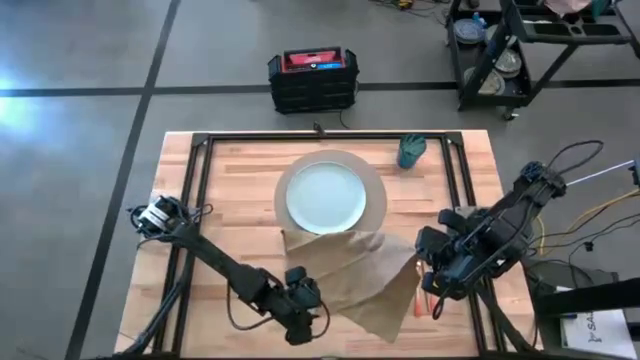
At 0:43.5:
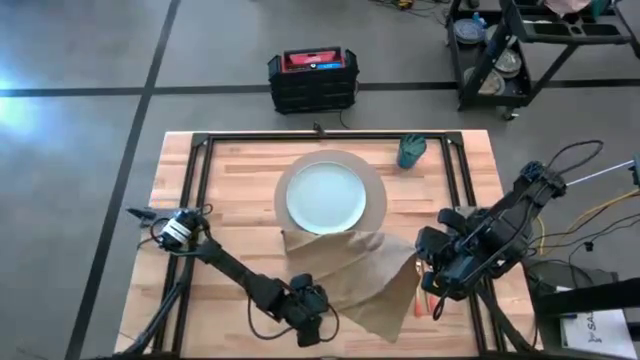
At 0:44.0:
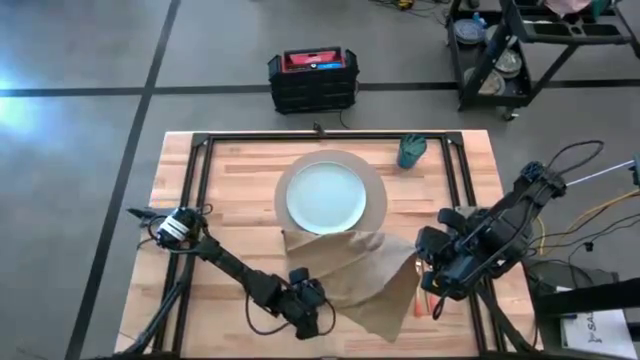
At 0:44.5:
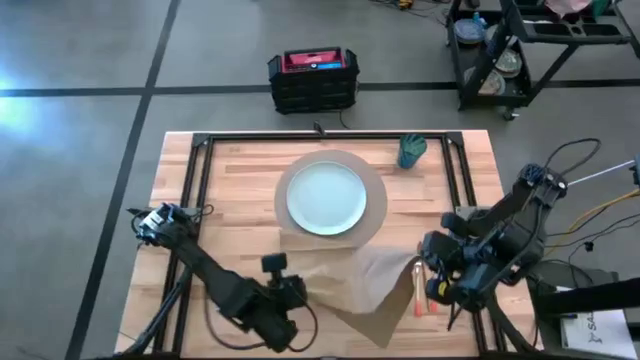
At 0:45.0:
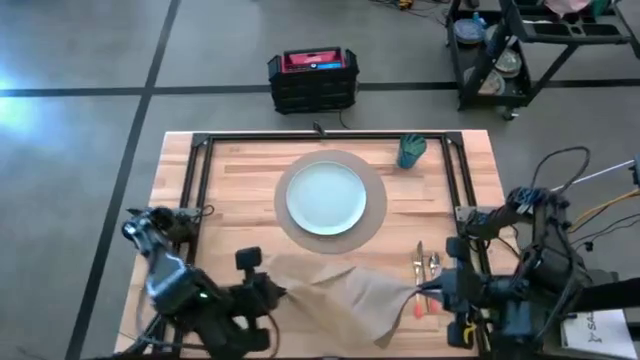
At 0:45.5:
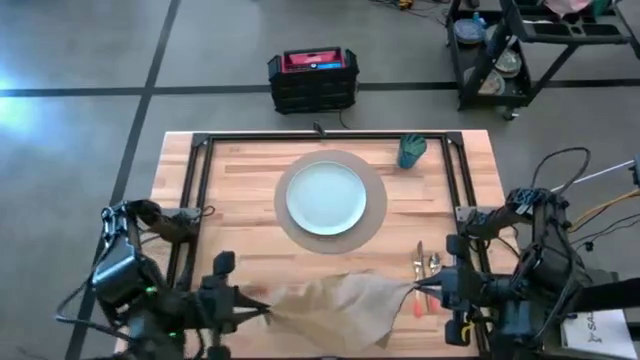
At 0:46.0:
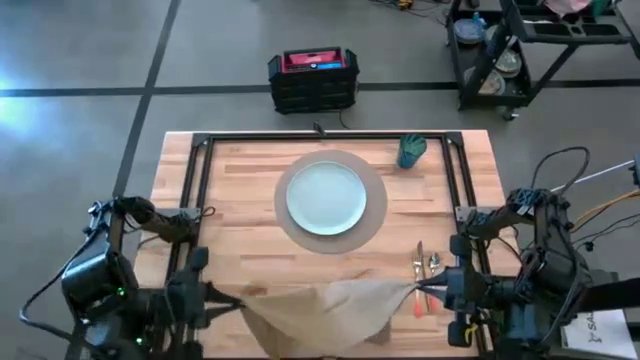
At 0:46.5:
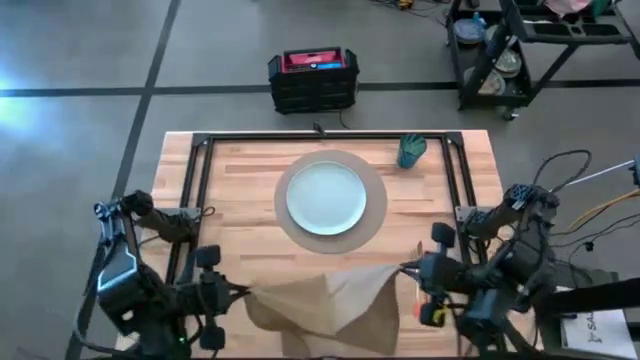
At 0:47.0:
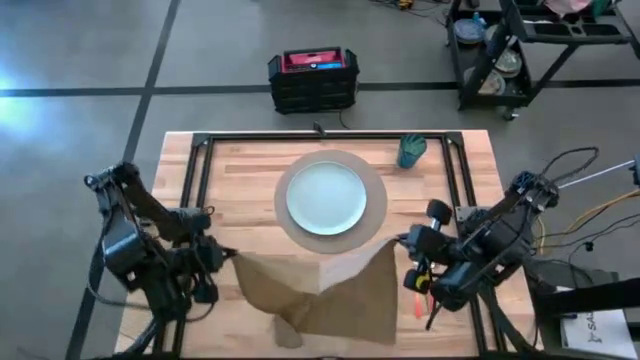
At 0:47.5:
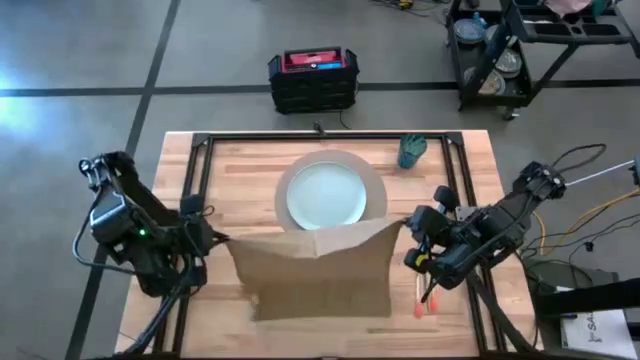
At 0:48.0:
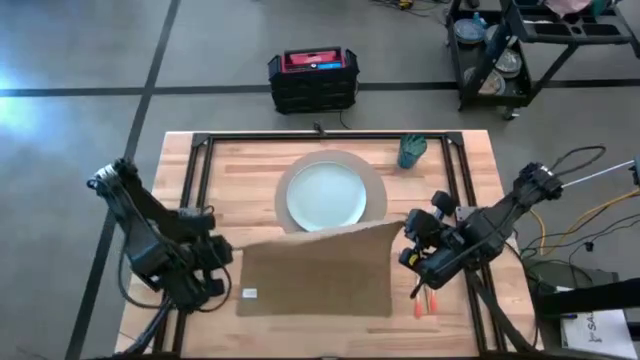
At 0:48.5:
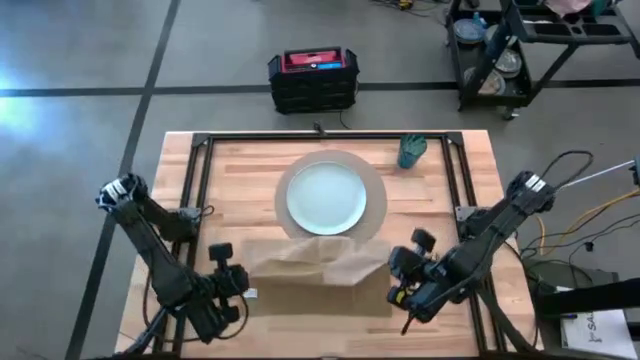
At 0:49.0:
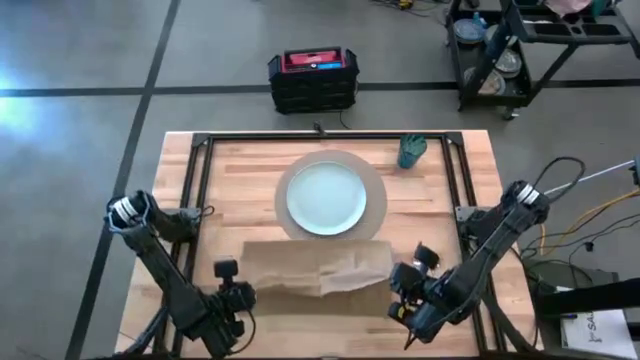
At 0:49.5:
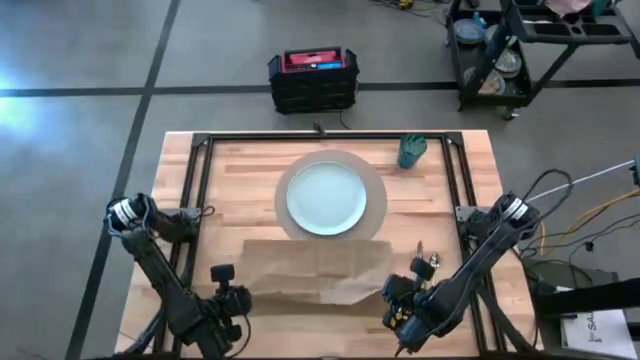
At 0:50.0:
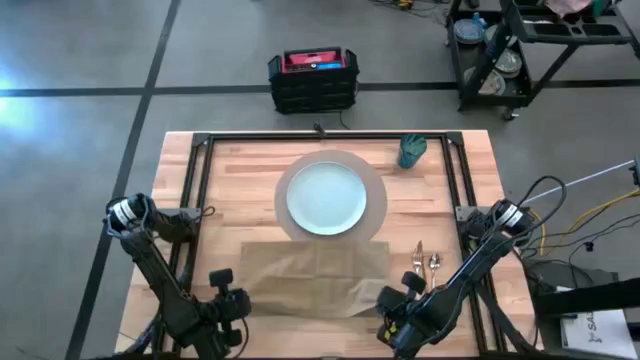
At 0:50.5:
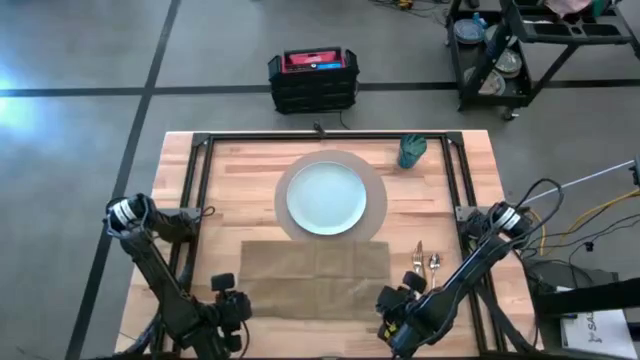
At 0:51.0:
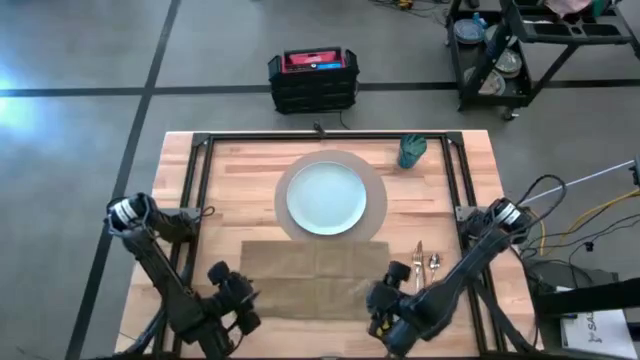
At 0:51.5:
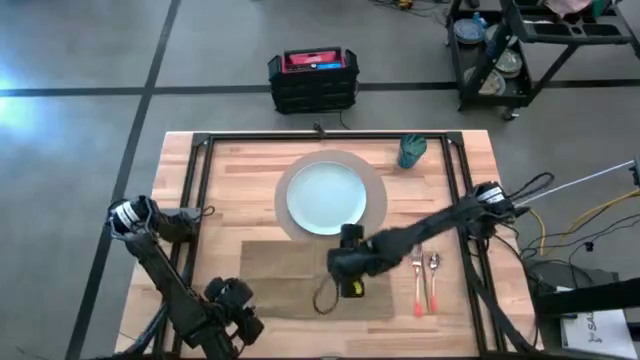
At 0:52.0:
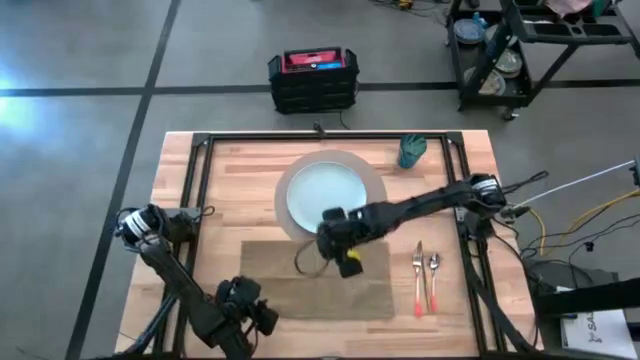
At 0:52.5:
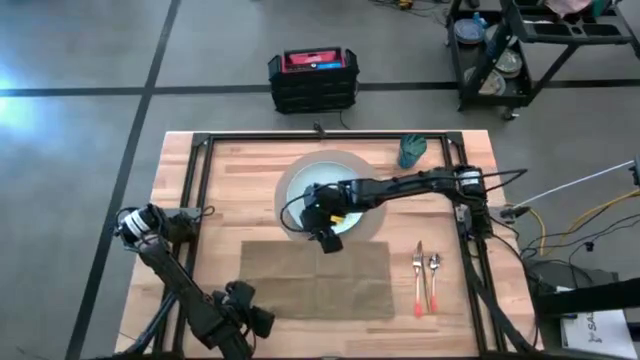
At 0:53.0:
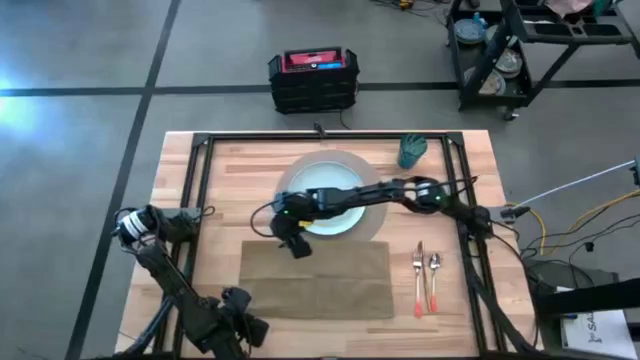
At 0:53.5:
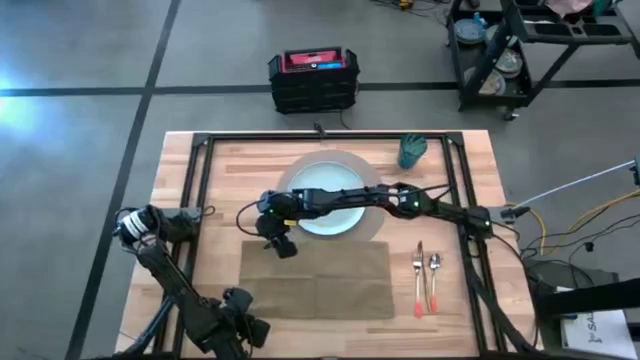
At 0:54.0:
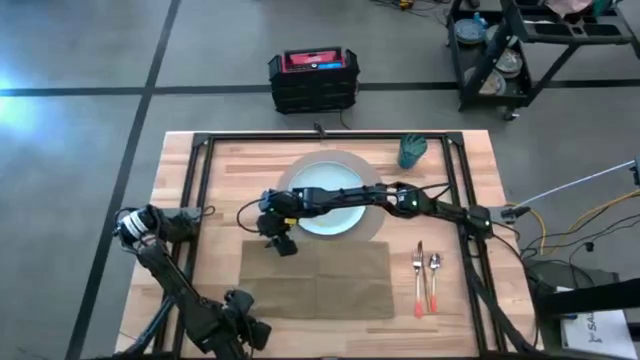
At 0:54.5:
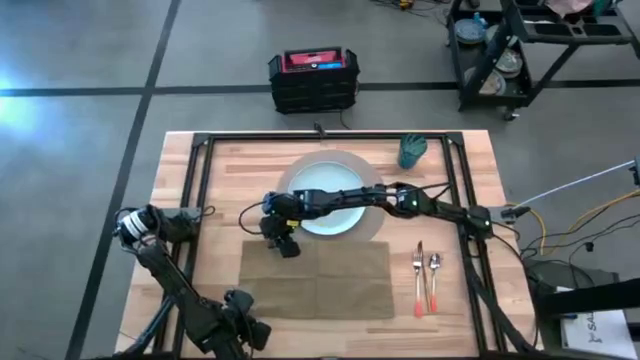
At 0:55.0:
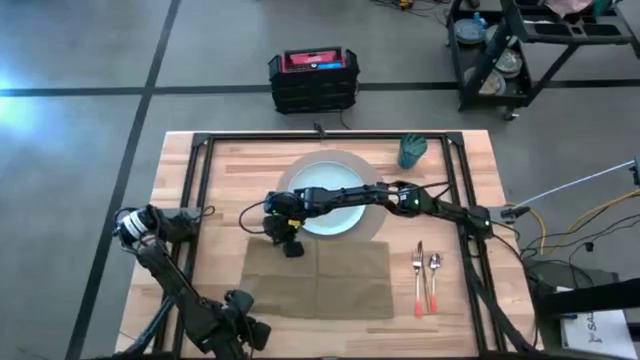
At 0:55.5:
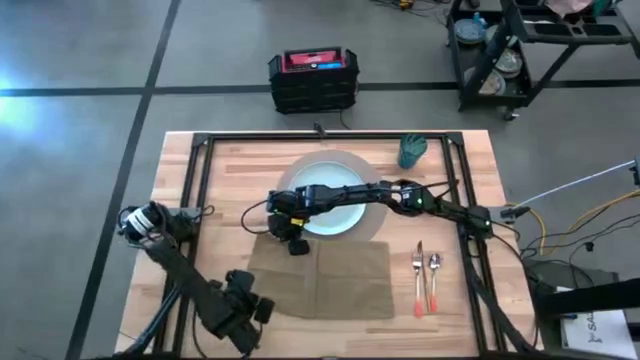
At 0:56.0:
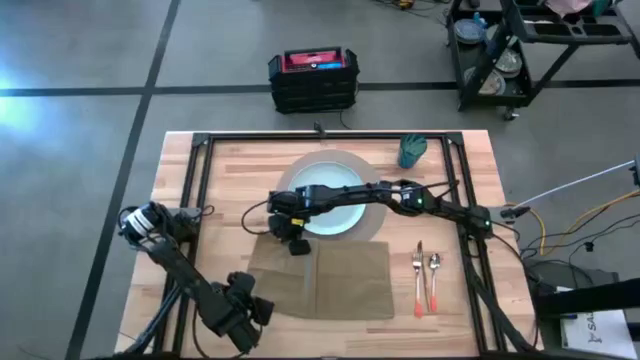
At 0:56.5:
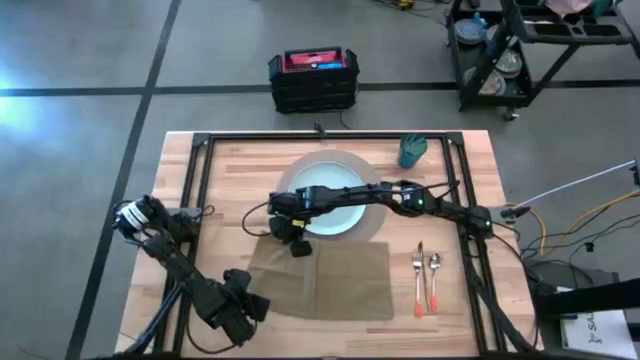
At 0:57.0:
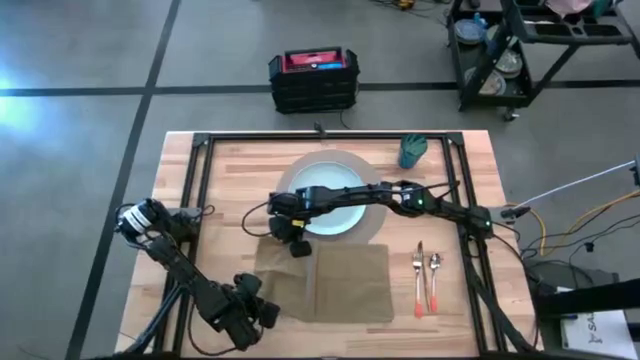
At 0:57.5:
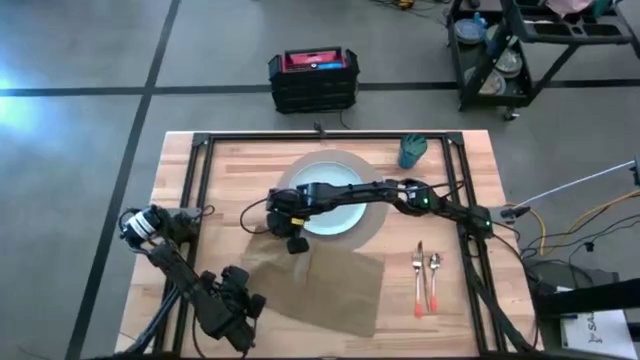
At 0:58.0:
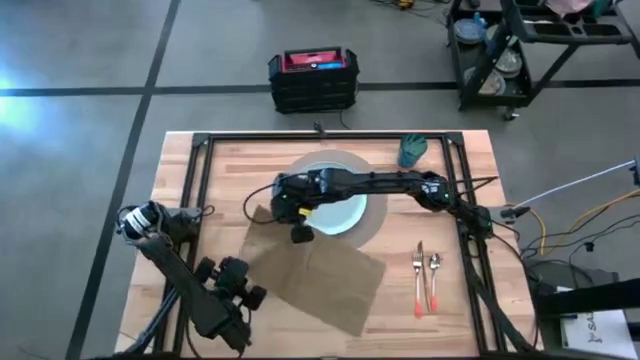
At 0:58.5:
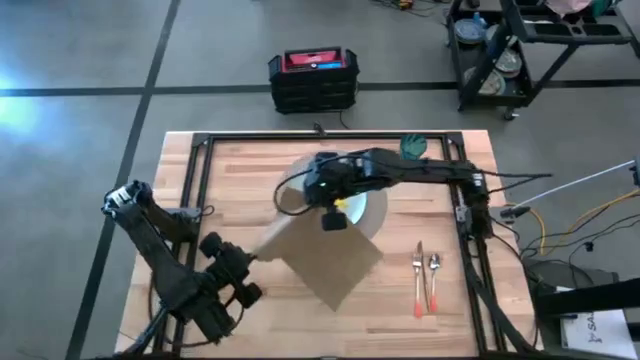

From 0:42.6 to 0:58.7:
Task: Set table place
Fold the brown table napkin

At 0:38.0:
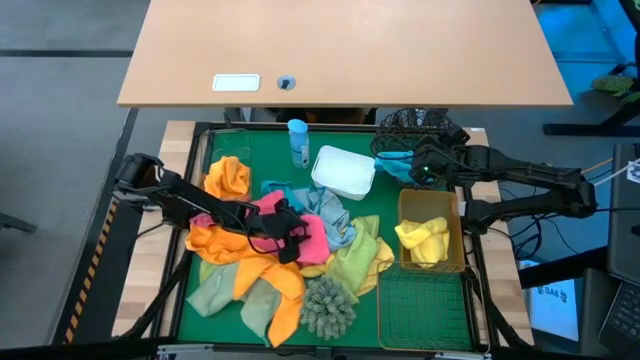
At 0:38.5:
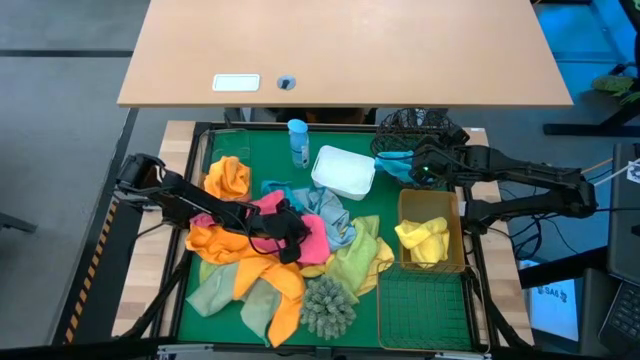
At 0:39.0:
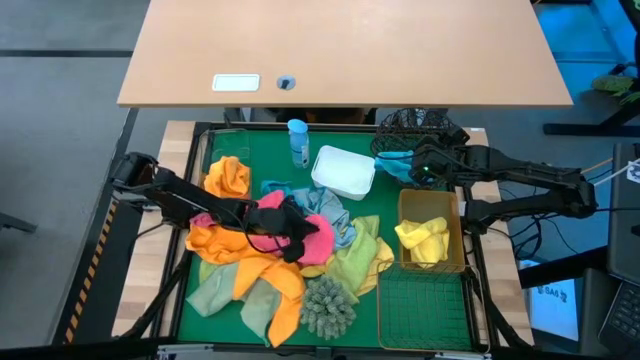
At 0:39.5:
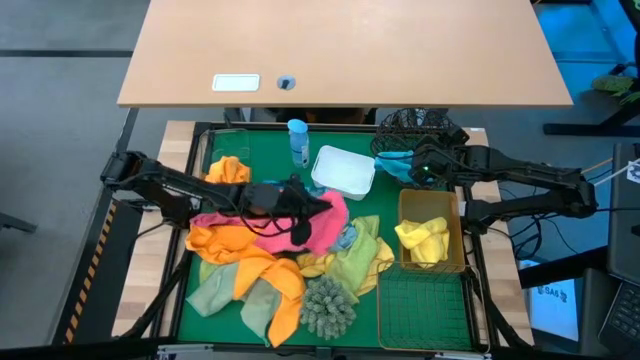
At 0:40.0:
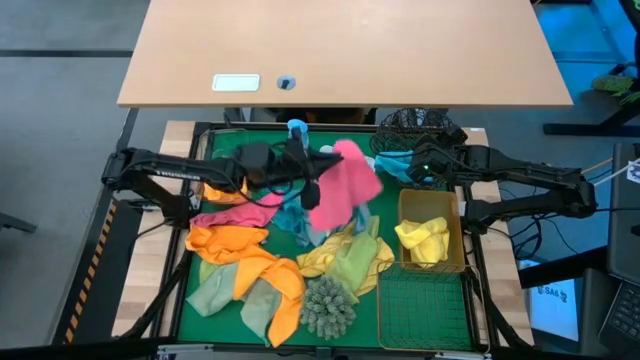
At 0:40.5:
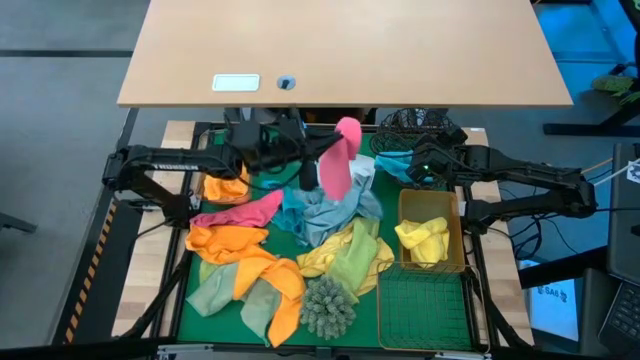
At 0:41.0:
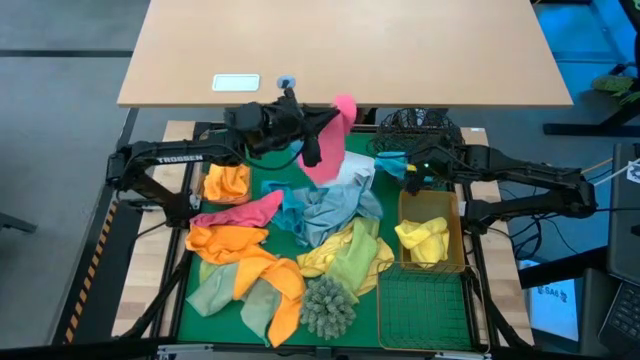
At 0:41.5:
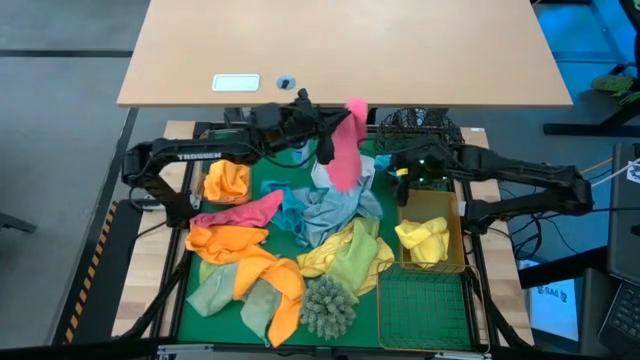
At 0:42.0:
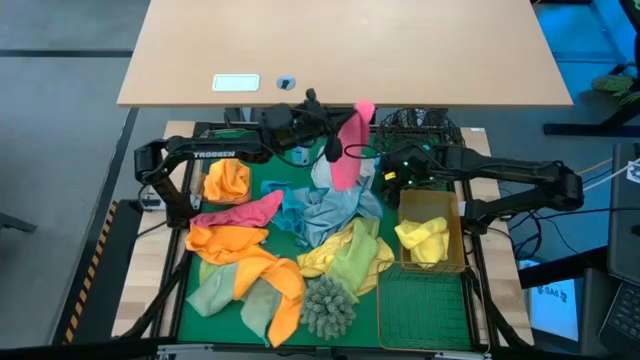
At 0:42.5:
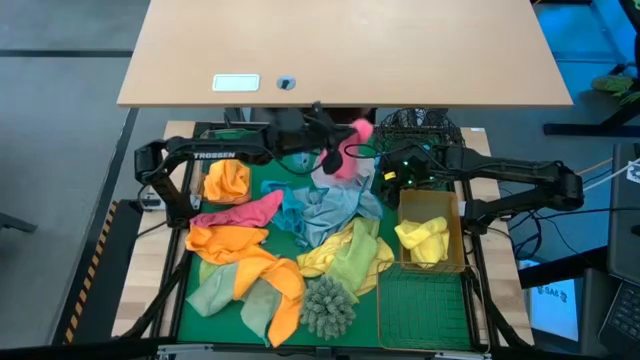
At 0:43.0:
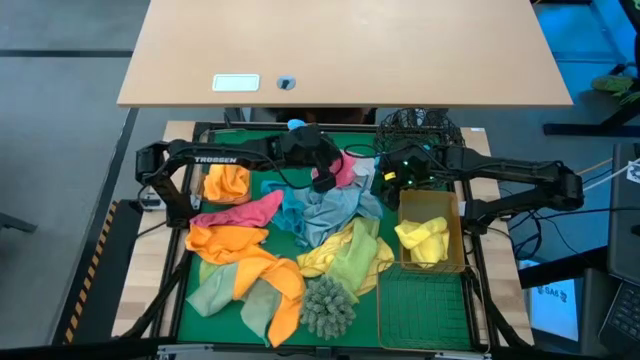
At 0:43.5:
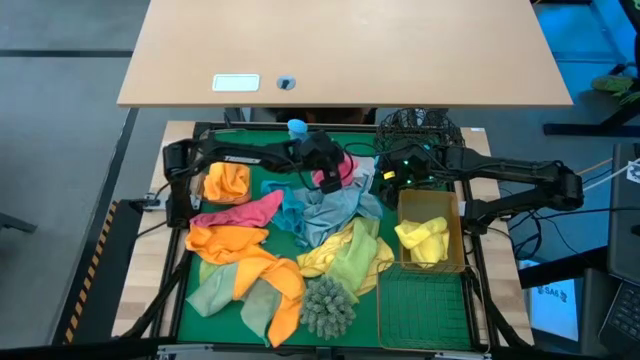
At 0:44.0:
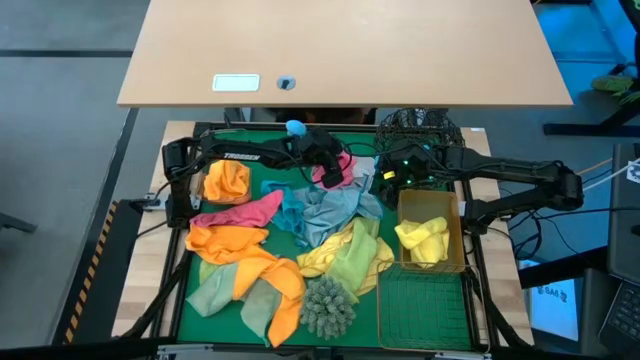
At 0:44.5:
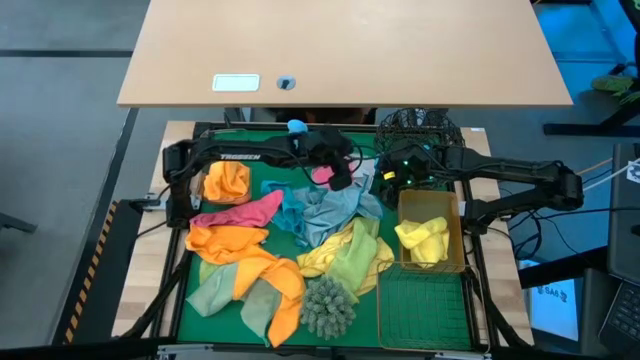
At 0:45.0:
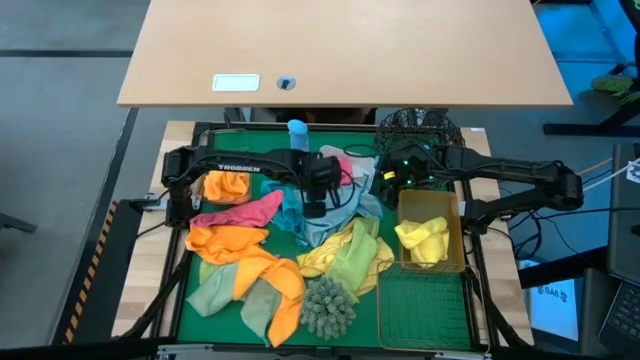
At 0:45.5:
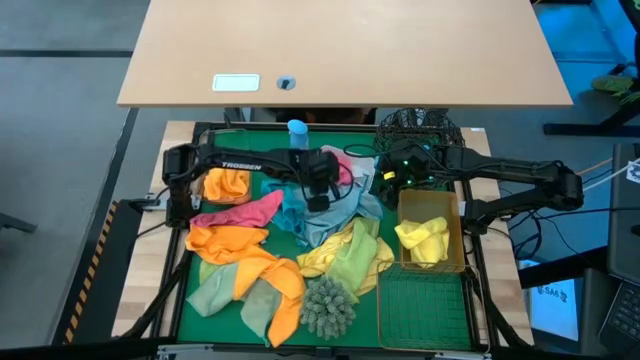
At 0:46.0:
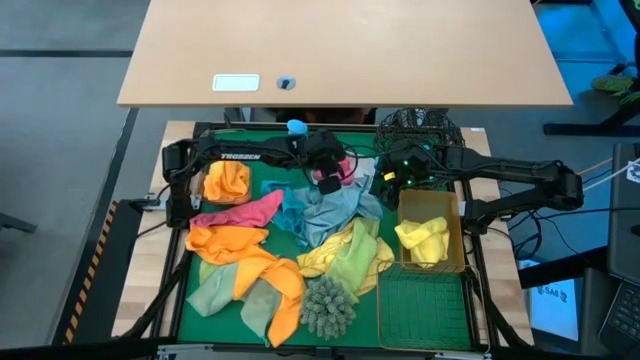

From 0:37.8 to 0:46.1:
Task: Sort microfiber towel by color & place in baskets
Put the pink microfiber towel into the white bin
